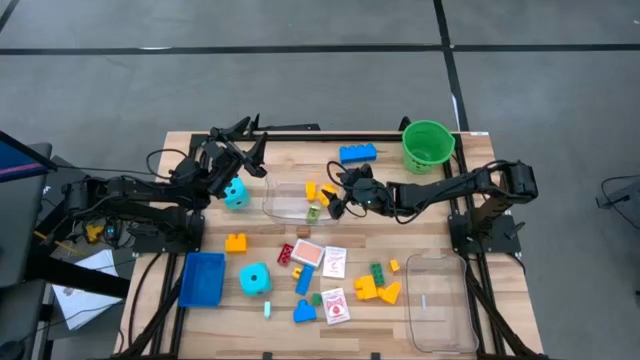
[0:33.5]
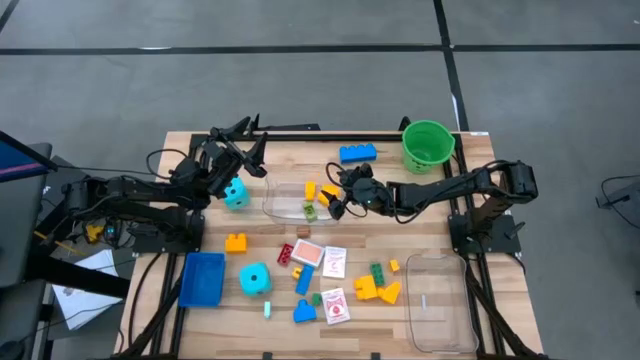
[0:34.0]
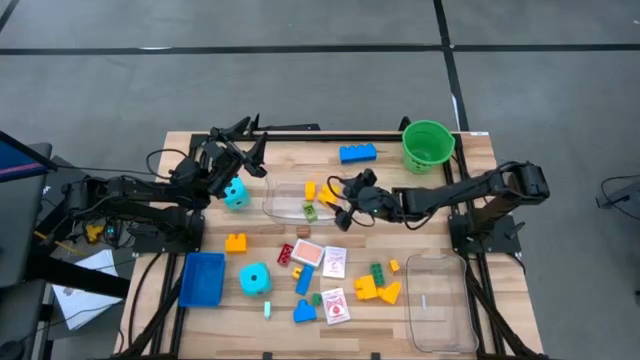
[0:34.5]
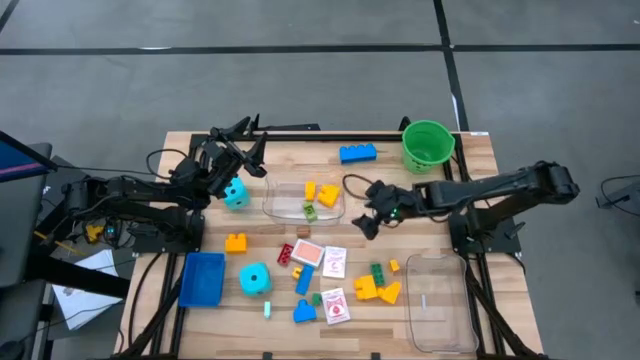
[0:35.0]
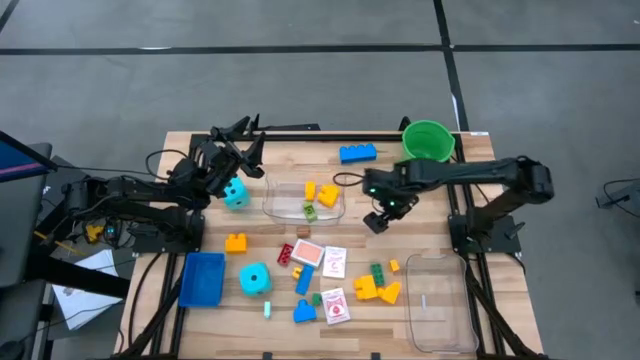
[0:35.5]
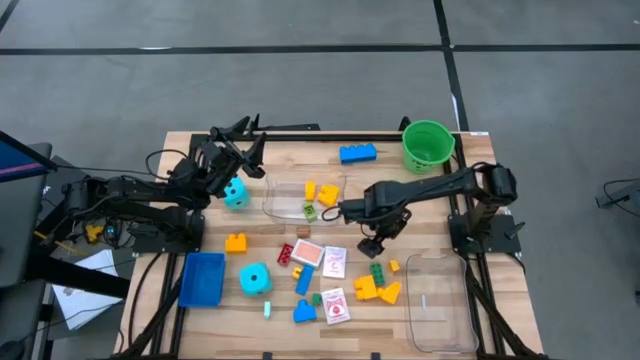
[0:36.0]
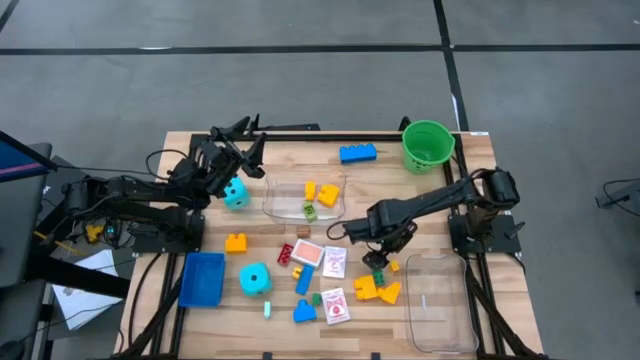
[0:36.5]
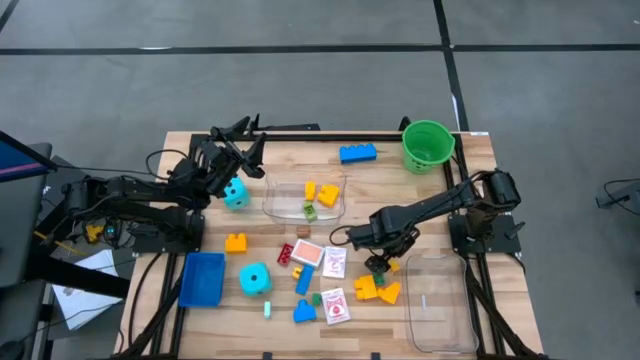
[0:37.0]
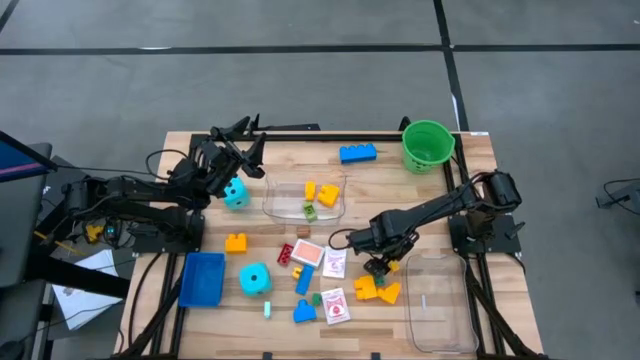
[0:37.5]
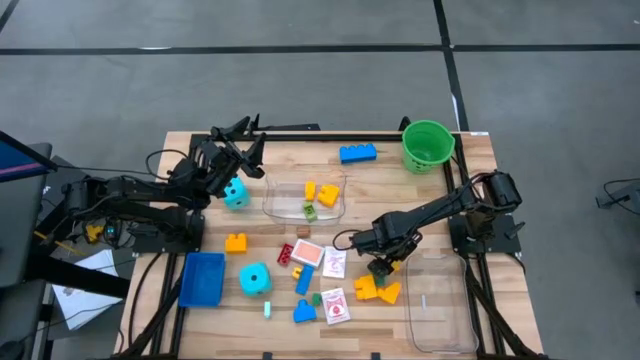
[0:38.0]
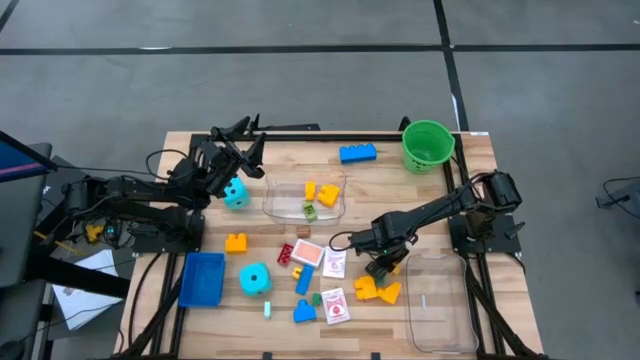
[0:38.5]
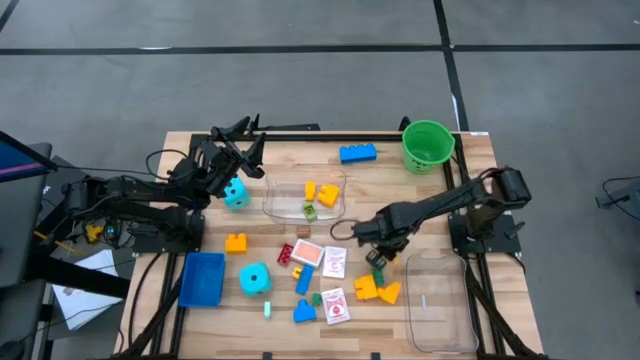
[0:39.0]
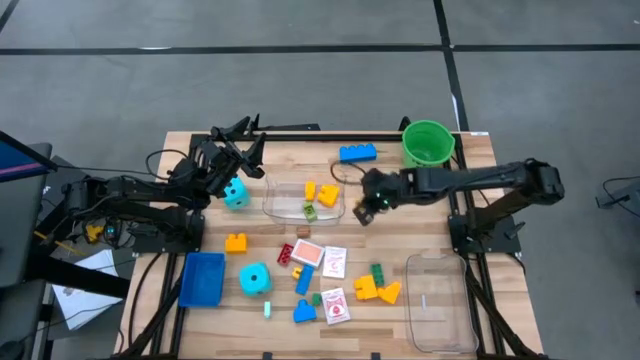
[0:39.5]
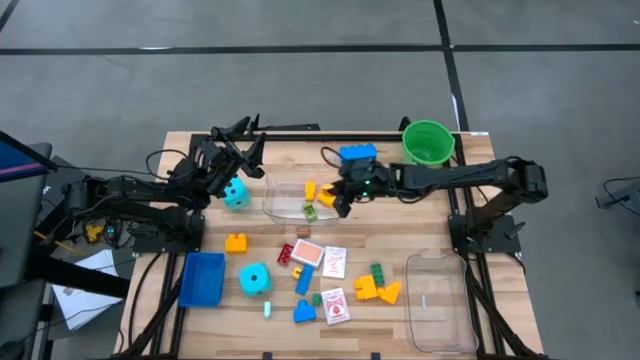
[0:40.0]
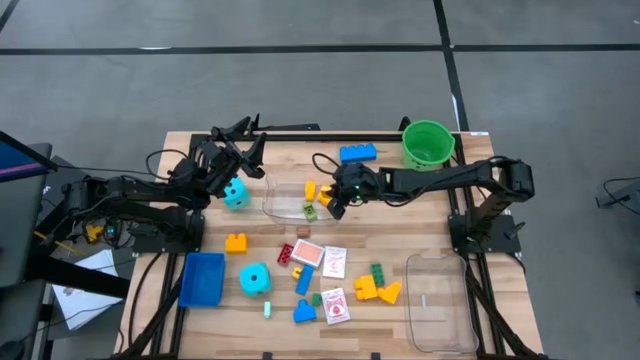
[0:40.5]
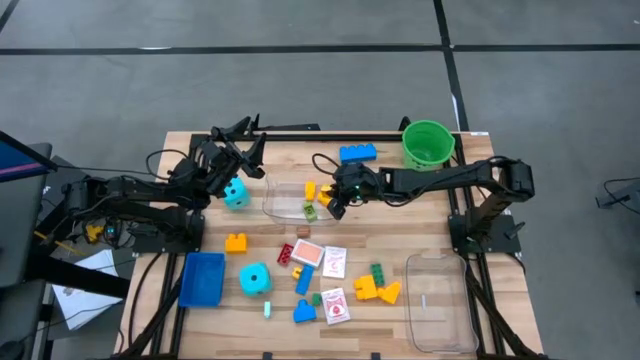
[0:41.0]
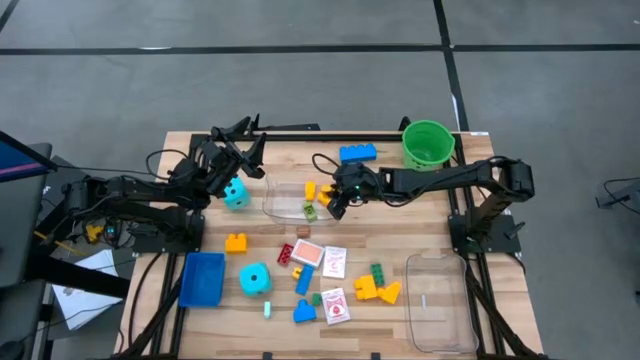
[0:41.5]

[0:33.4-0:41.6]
Task: Pick & Place Toys
Put the yellow game piece into the top transparent bin

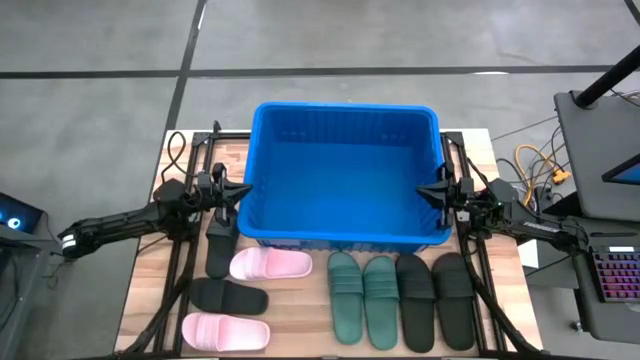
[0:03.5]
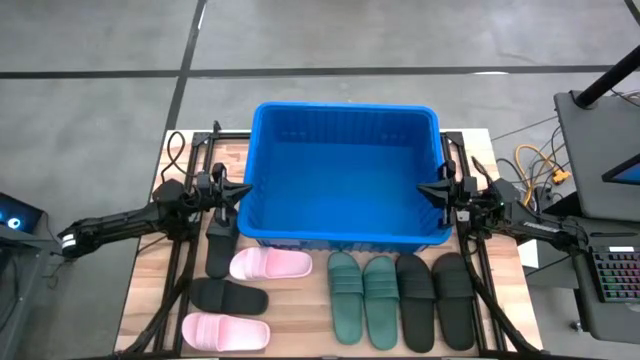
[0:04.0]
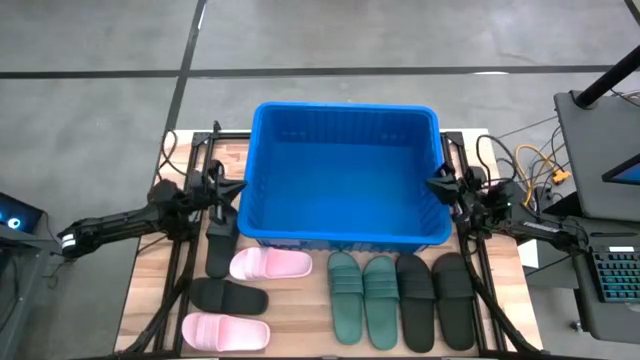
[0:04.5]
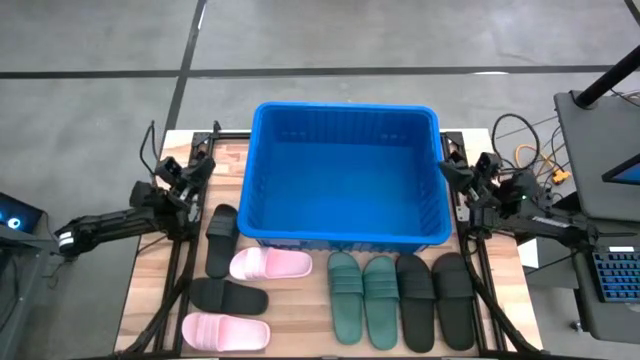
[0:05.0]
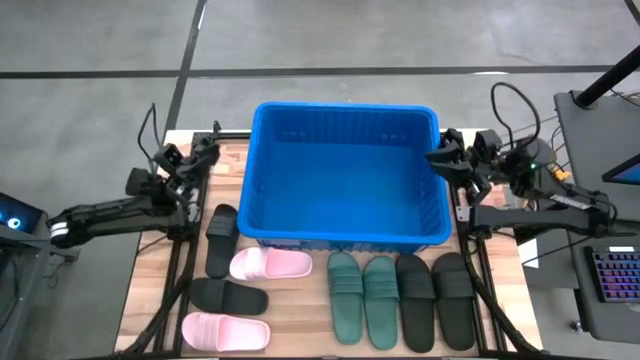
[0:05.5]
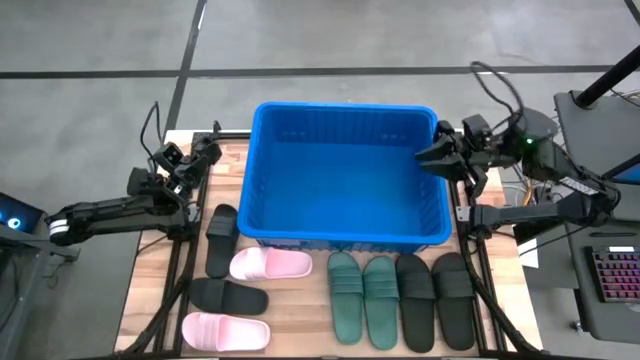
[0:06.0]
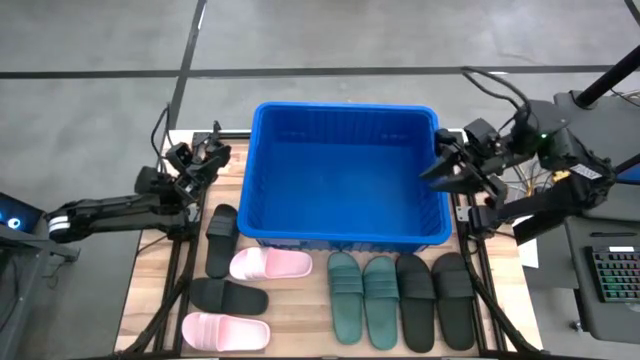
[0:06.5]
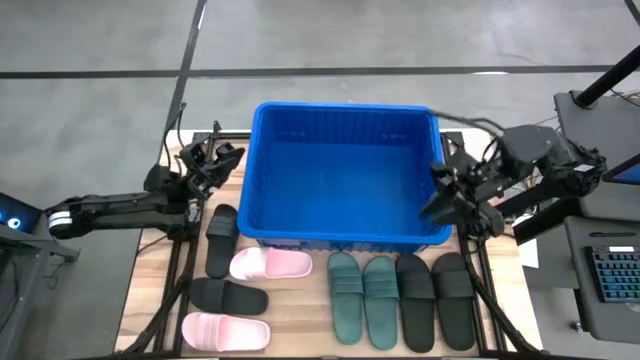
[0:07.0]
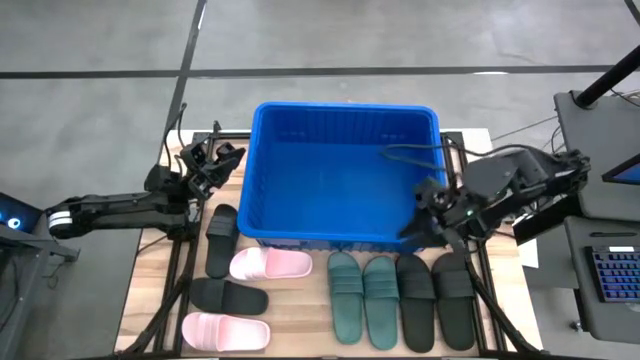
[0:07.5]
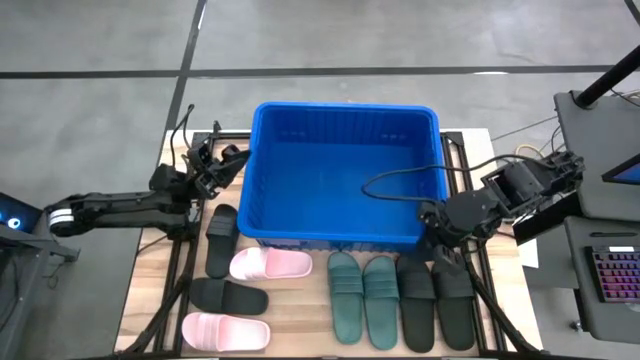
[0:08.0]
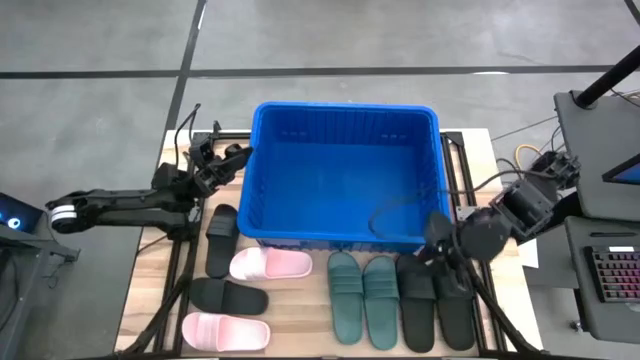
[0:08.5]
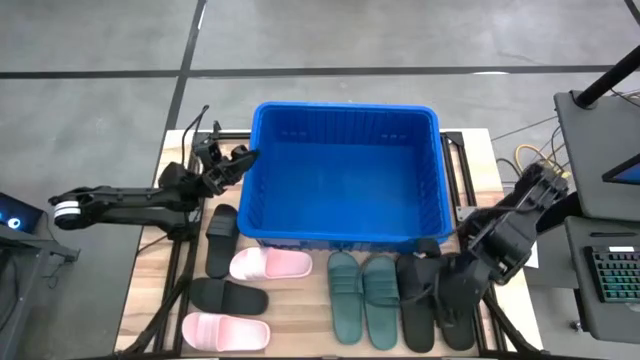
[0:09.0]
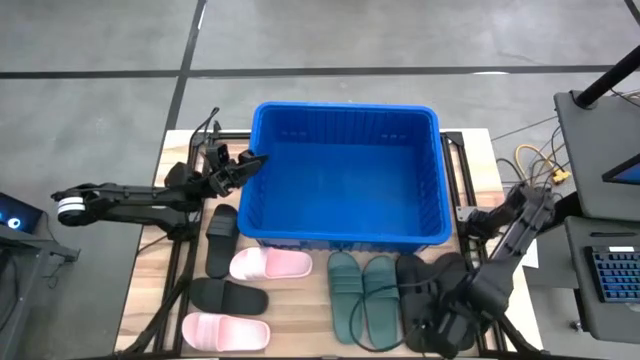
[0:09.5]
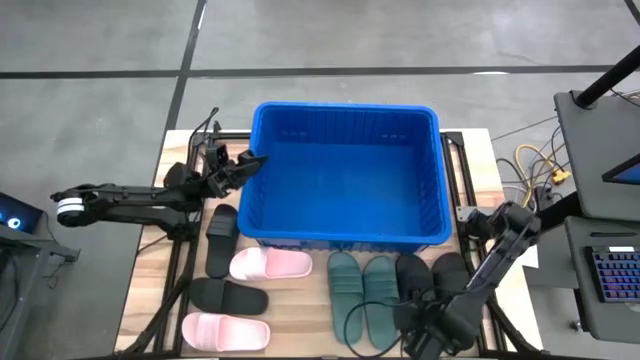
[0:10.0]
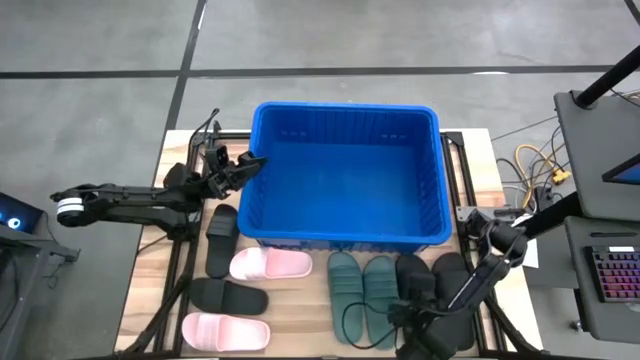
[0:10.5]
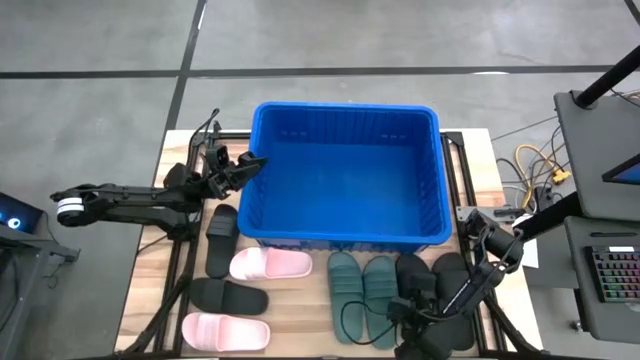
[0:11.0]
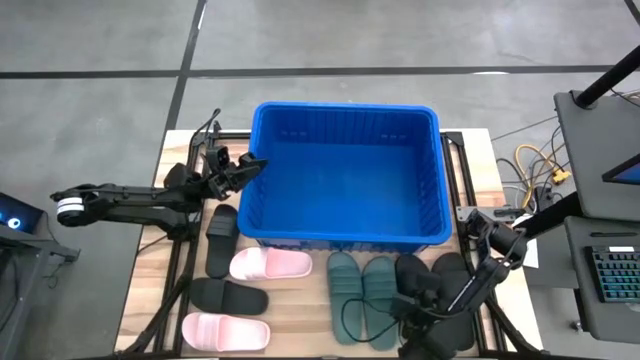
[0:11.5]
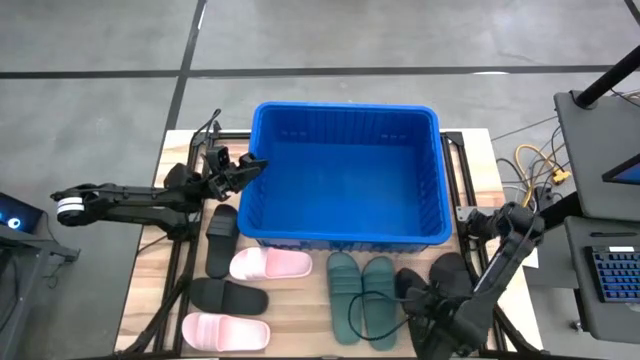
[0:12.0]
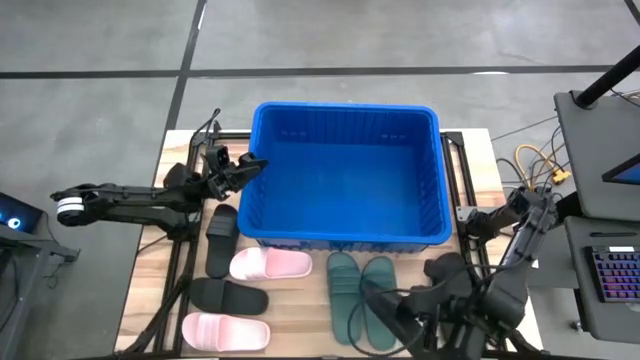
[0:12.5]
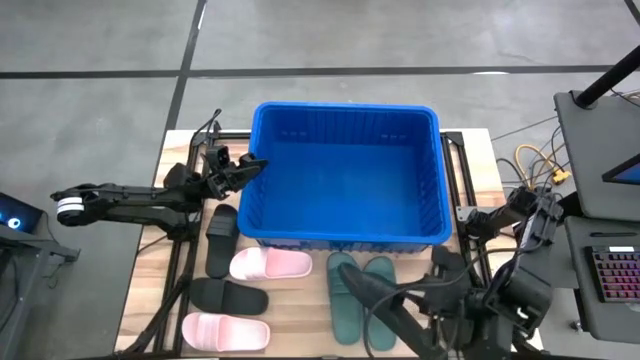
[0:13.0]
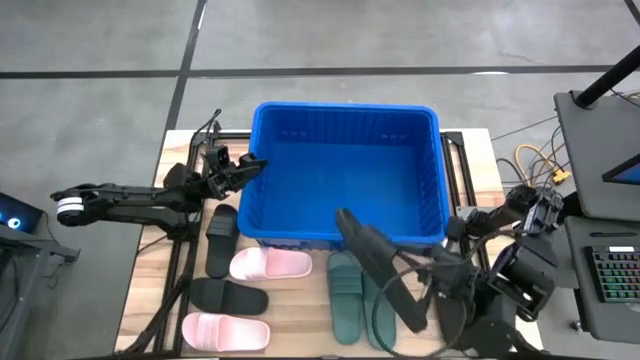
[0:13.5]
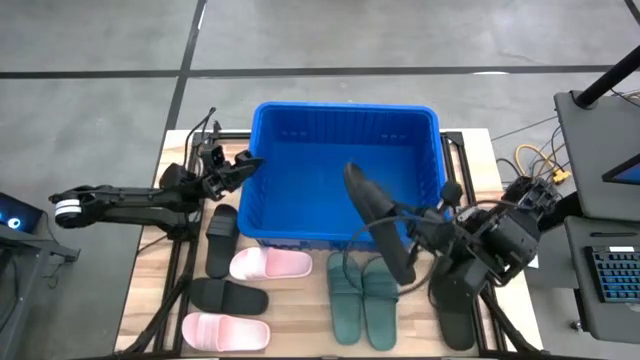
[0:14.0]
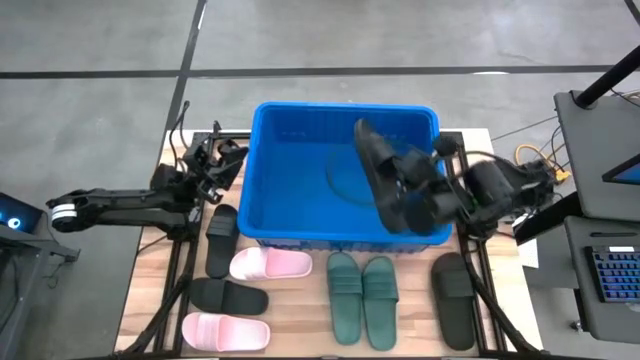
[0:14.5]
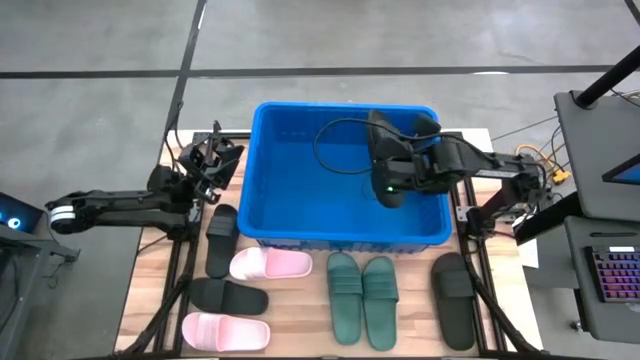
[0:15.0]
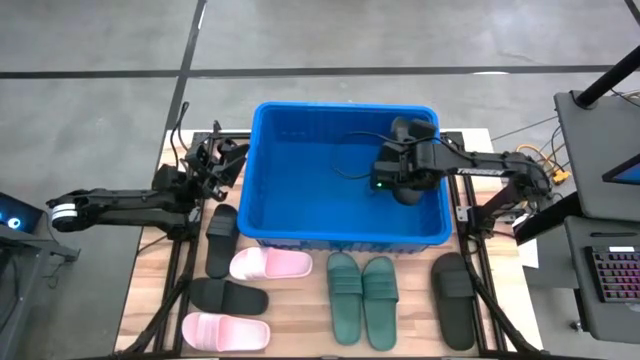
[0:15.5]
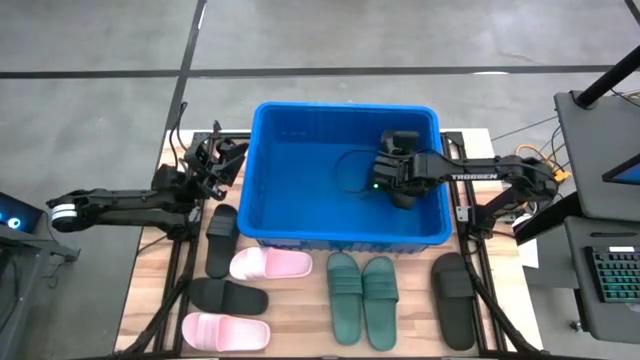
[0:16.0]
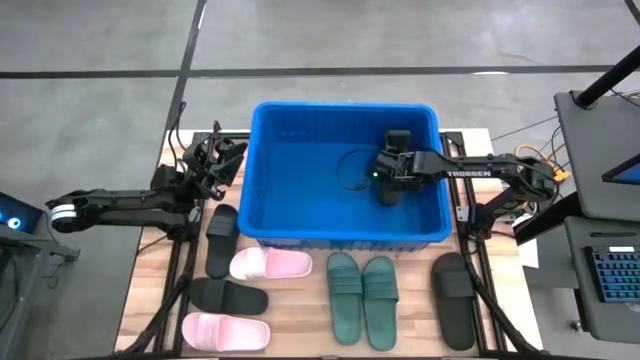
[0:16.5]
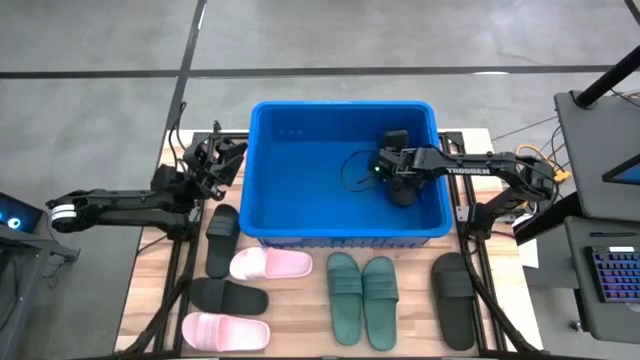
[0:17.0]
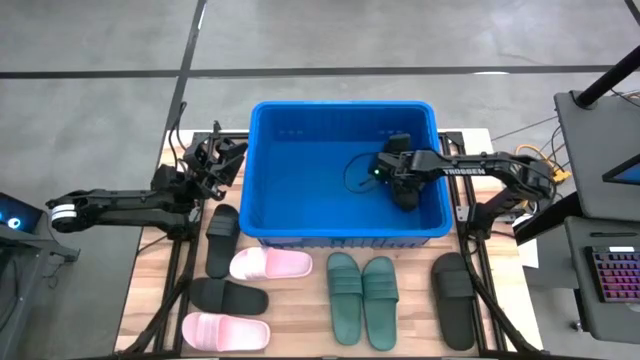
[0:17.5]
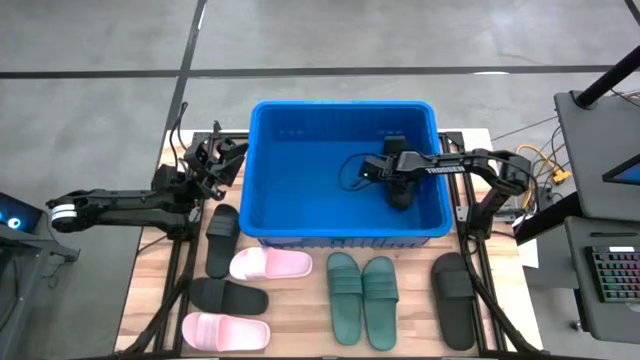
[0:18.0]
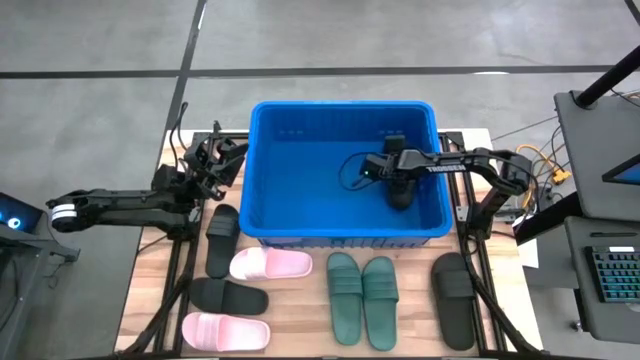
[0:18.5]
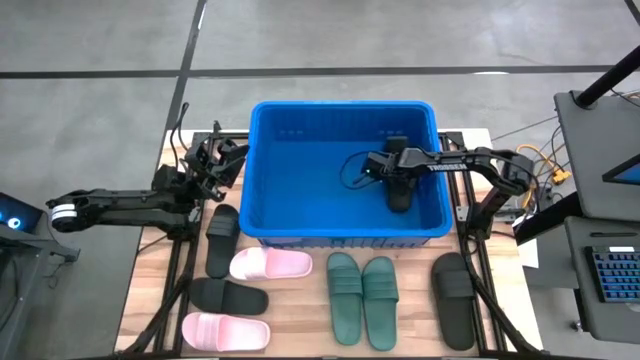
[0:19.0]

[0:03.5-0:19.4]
Task: Pick and place slides into bin
Put the black slide into the blue container
